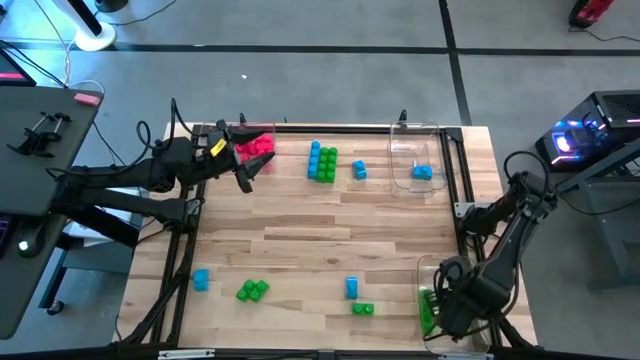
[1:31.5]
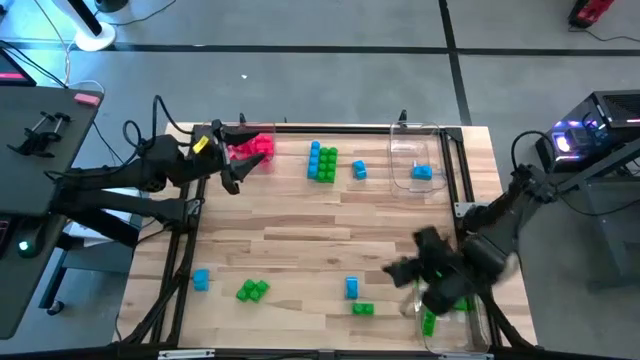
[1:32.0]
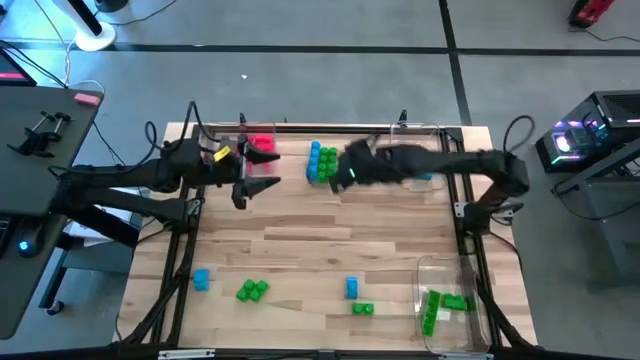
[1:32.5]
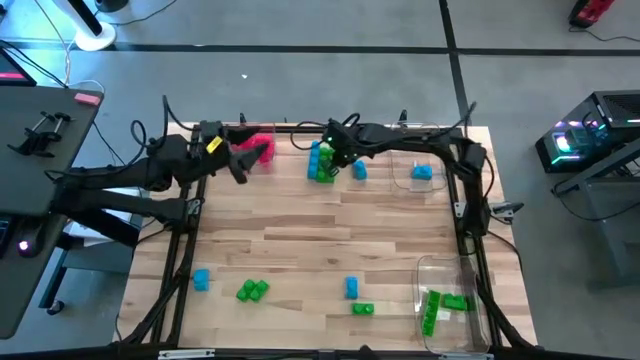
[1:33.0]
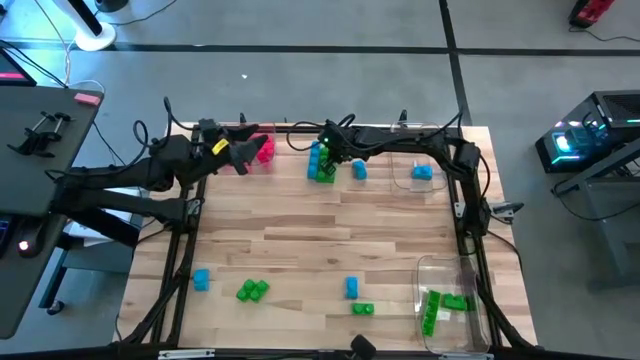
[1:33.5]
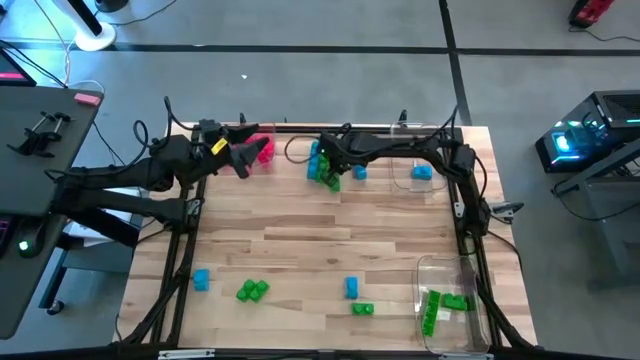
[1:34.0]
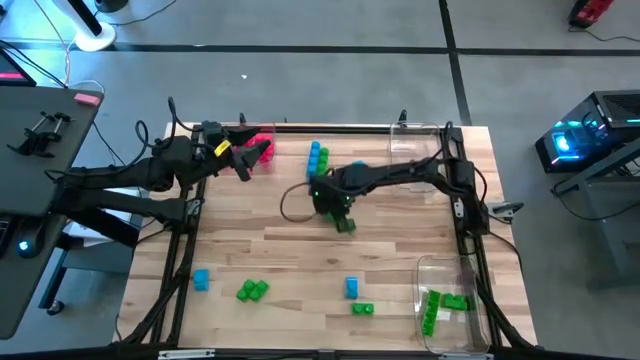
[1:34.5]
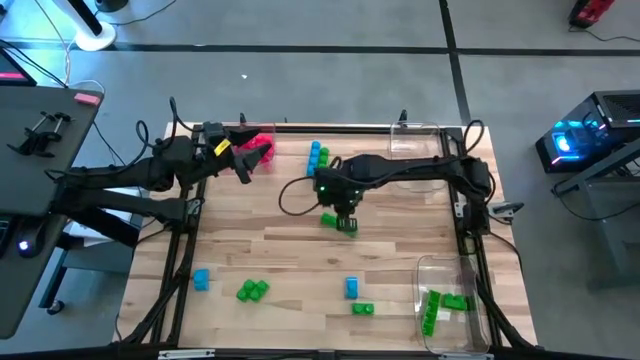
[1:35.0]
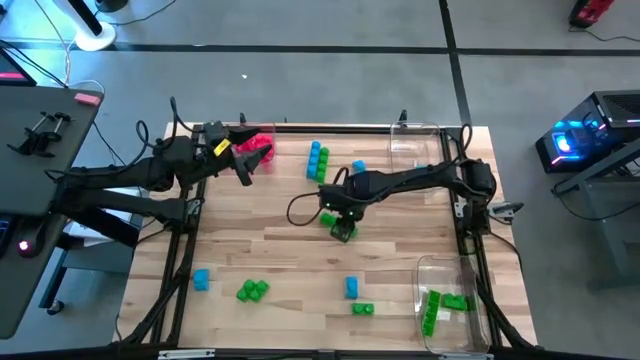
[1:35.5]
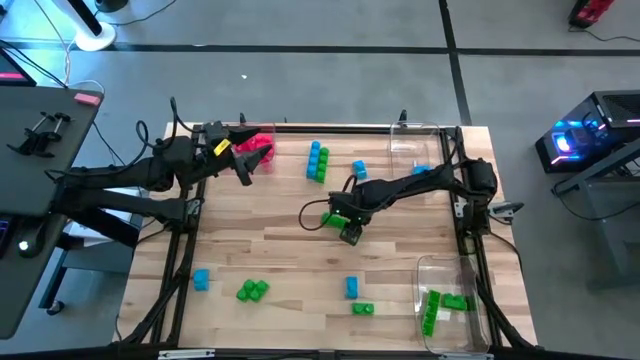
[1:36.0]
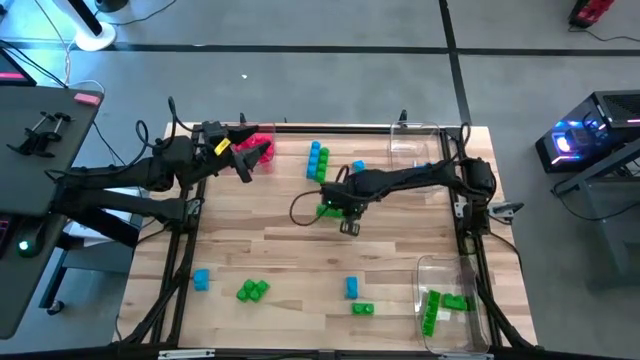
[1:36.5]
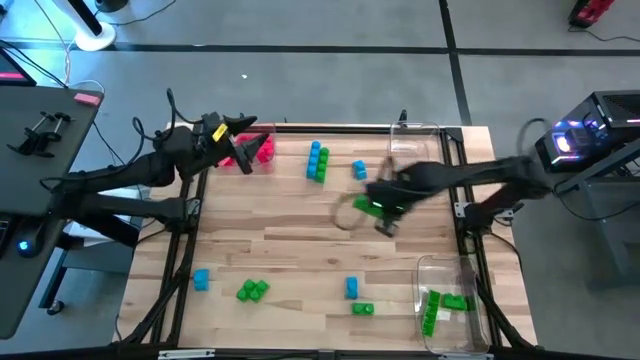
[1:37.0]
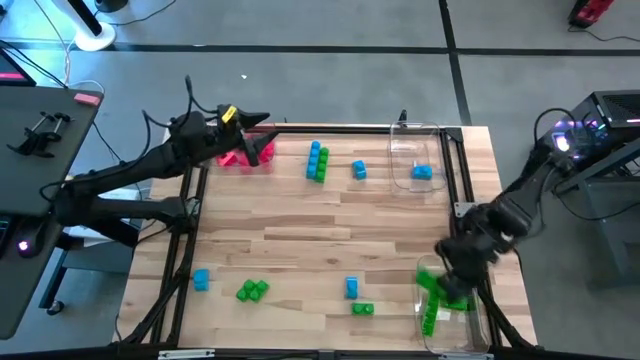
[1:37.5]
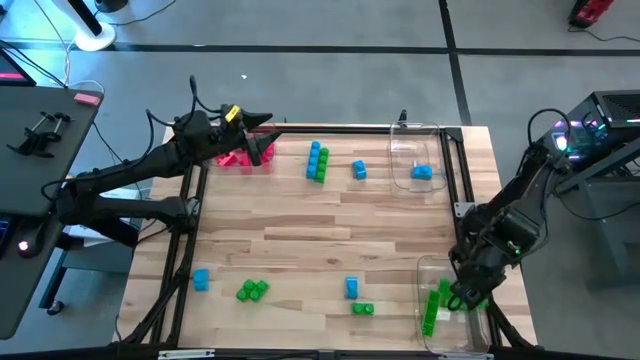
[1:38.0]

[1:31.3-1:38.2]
Task: Sort blocks
Put the green game piece into the bottom transparent bin

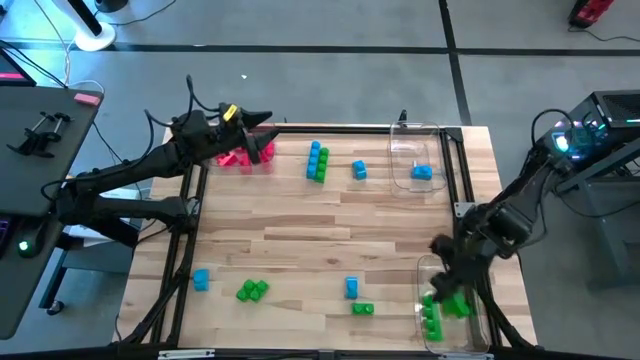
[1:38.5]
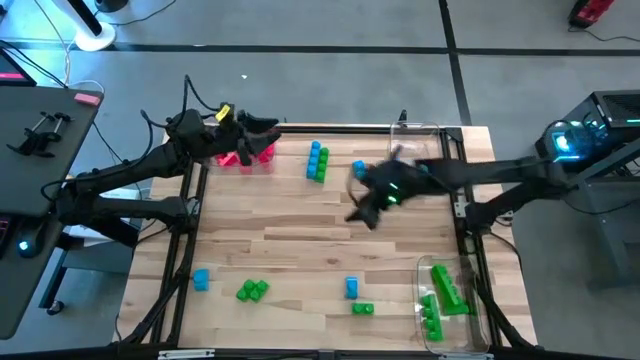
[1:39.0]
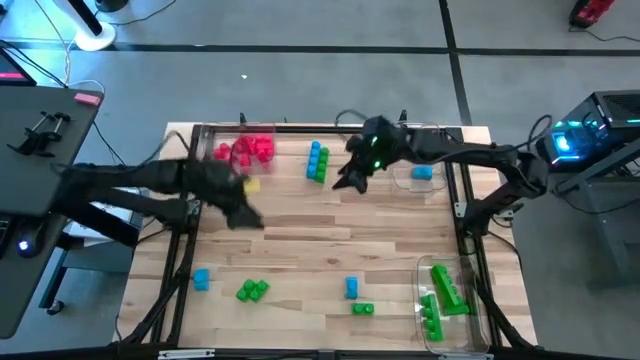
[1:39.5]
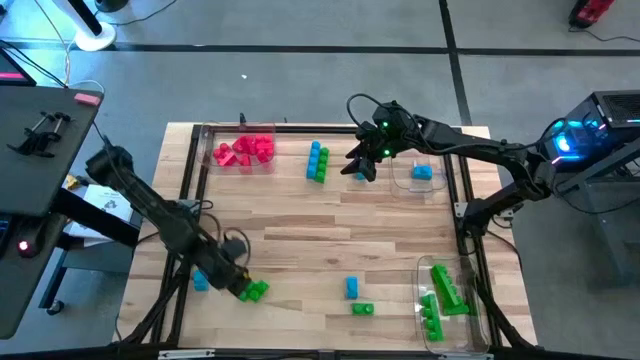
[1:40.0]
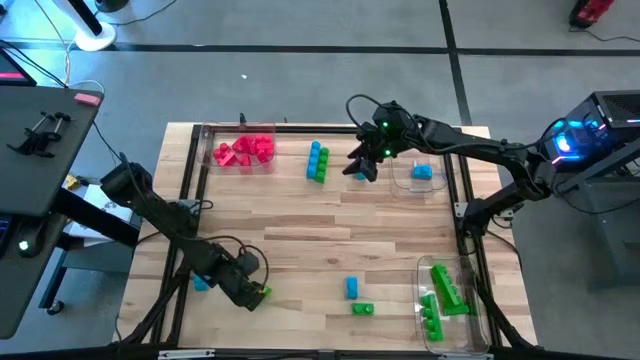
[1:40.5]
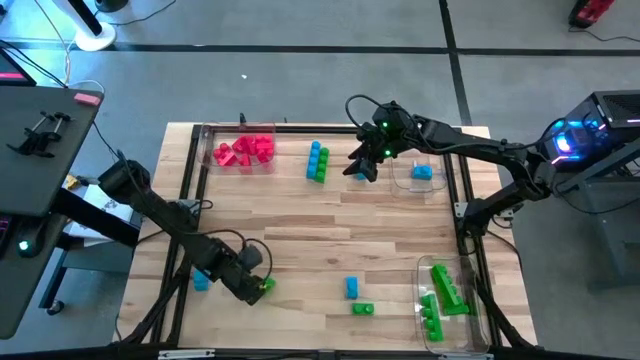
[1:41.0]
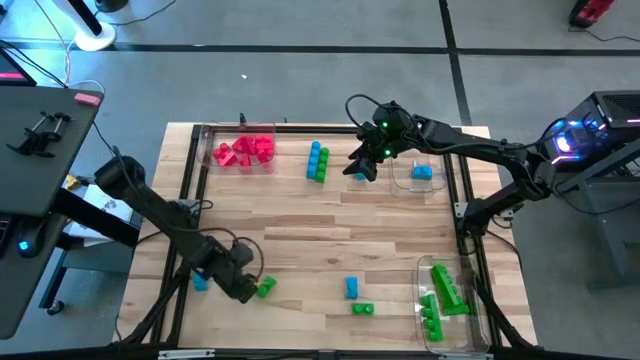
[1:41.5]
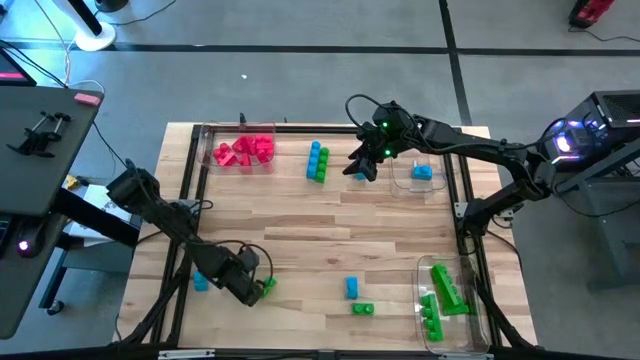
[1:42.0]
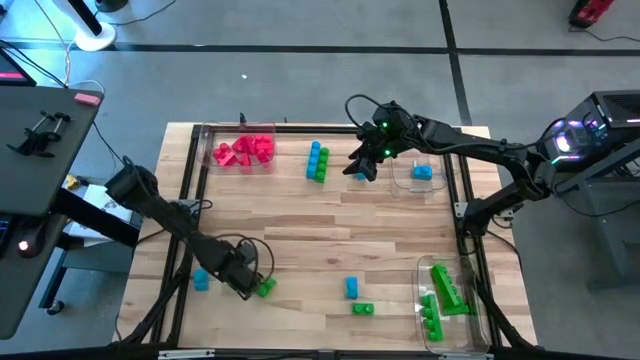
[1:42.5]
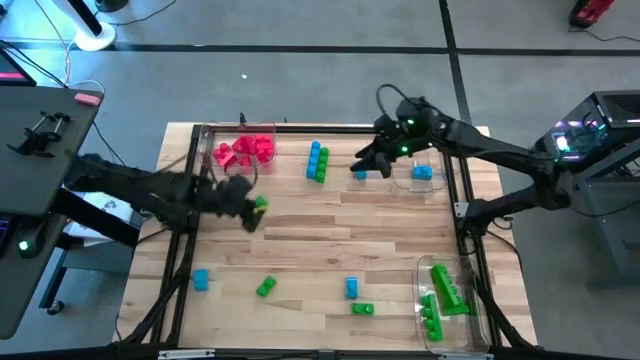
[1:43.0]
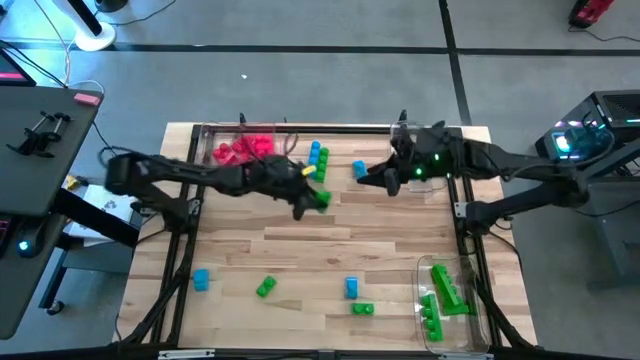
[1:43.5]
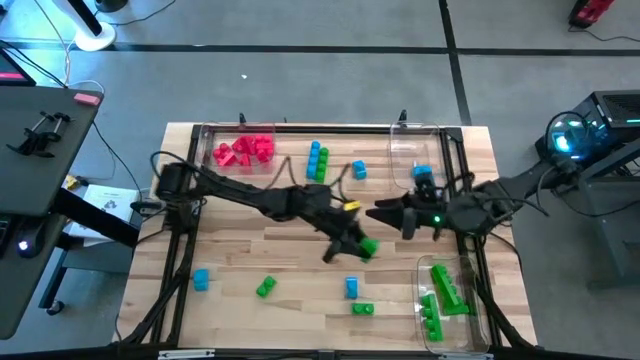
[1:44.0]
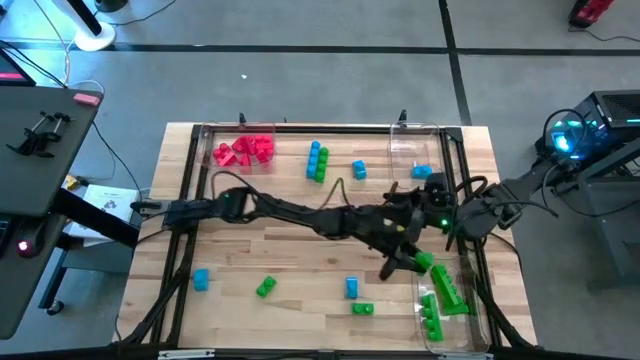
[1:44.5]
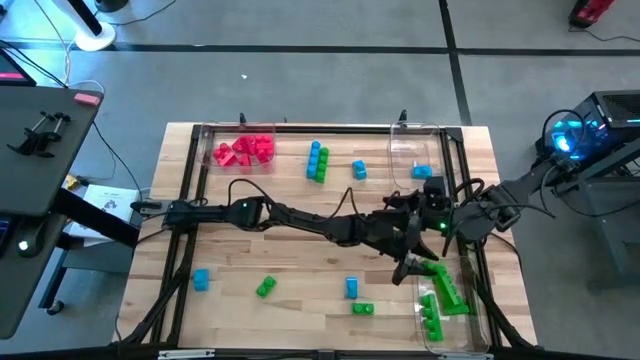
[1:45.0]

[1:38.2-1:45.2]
Put the green game piece into the bottom transparent bin

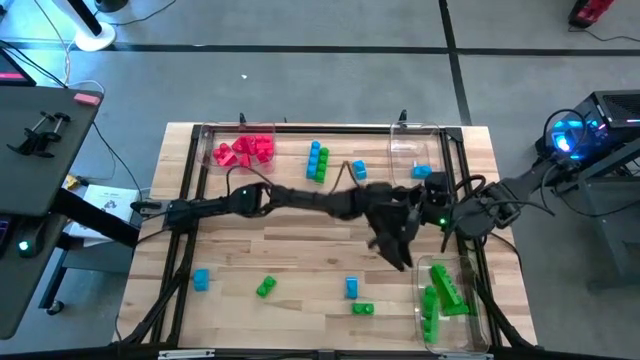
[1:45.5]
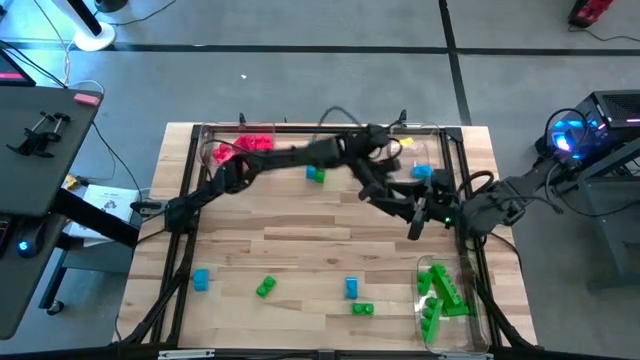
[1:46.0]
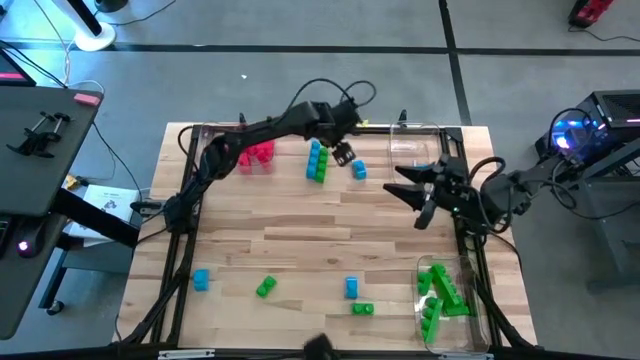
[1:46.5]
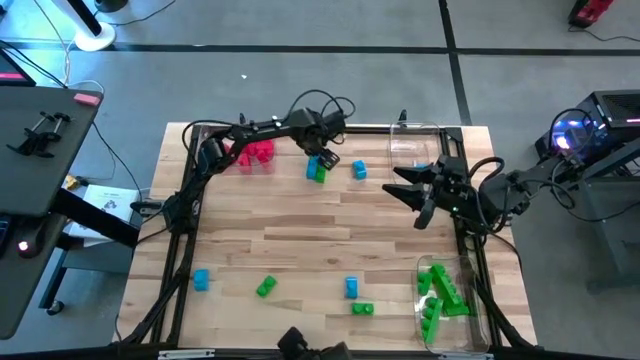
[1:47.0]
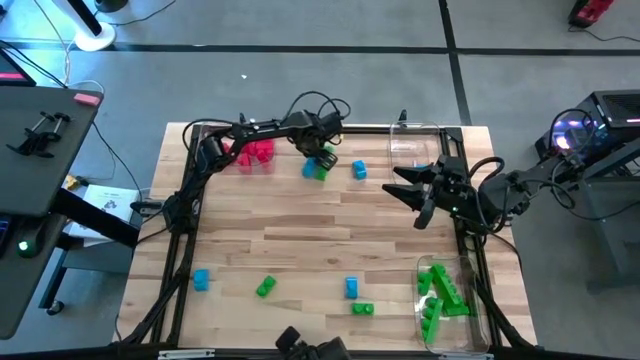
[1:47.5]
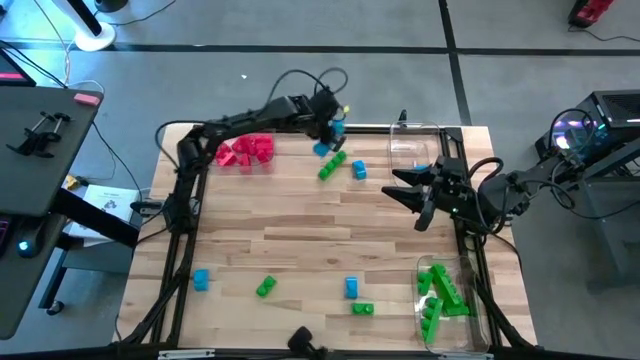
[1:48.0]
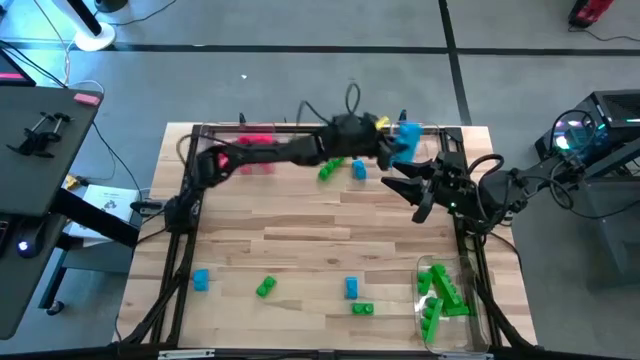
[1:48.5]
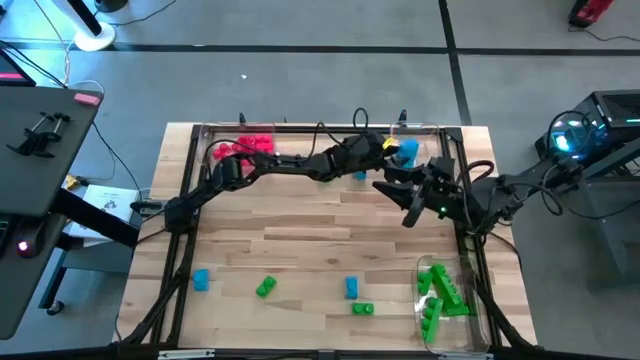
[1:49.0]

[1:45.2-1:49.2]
Put the blue game piece into the top right transparent bin

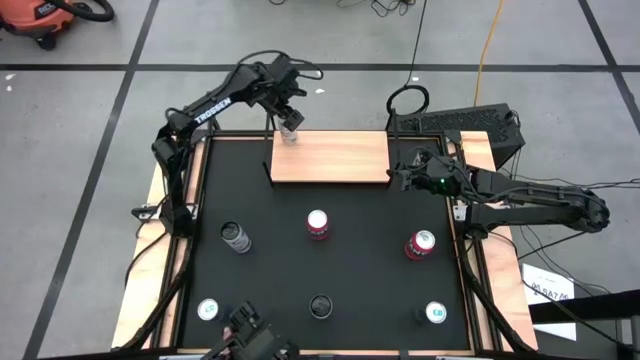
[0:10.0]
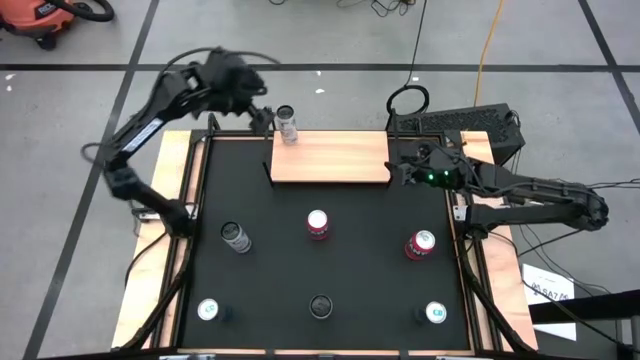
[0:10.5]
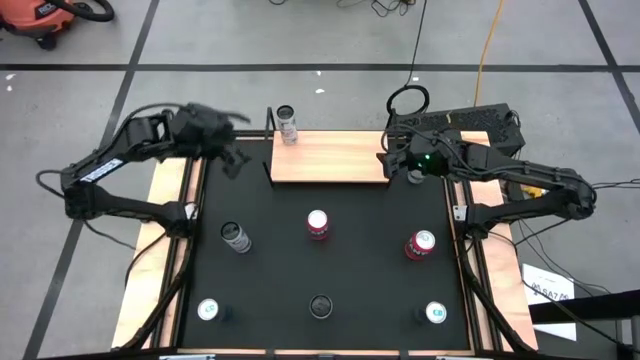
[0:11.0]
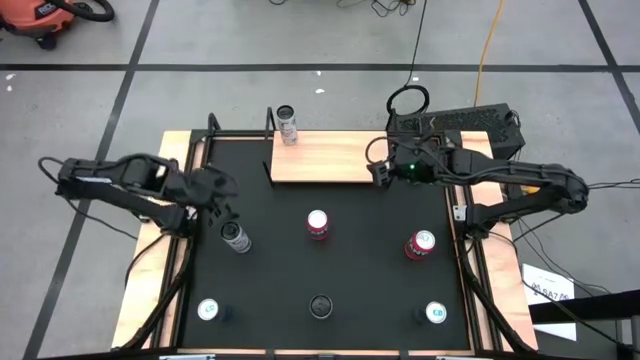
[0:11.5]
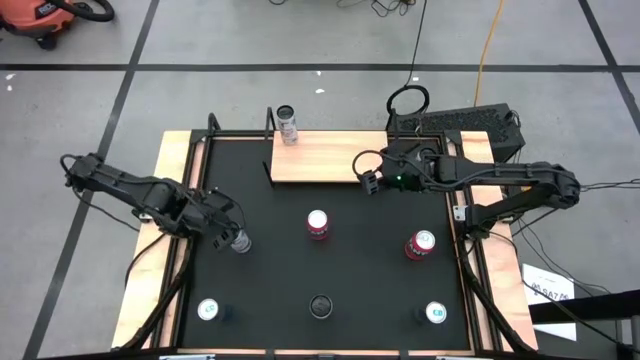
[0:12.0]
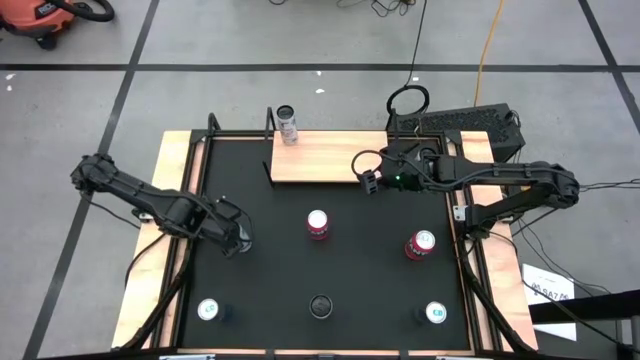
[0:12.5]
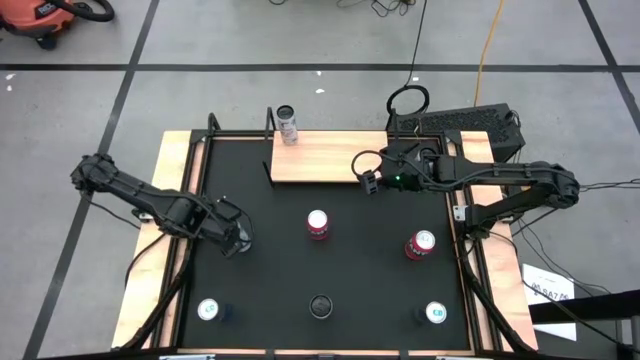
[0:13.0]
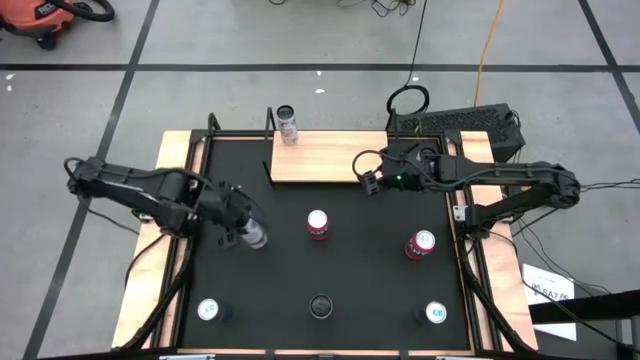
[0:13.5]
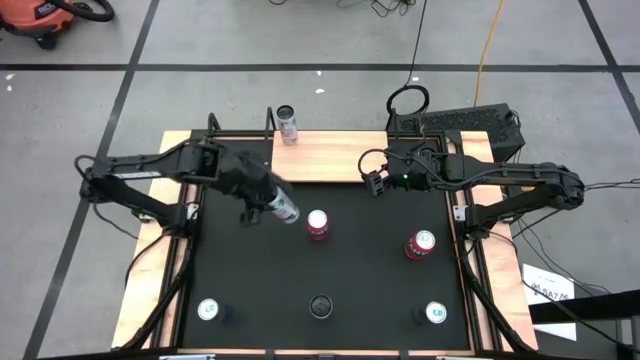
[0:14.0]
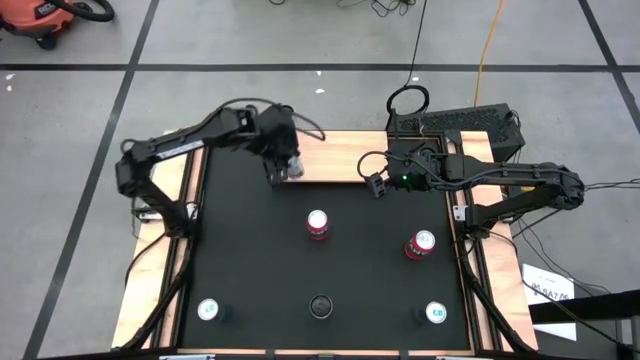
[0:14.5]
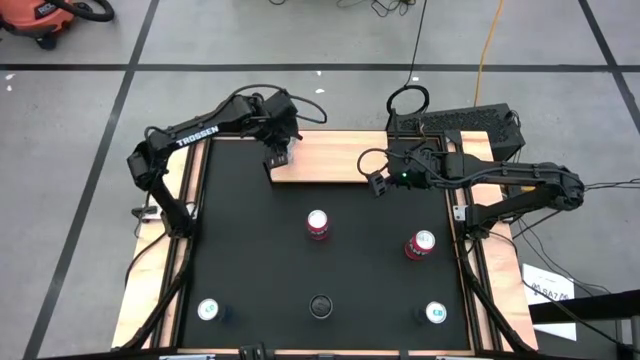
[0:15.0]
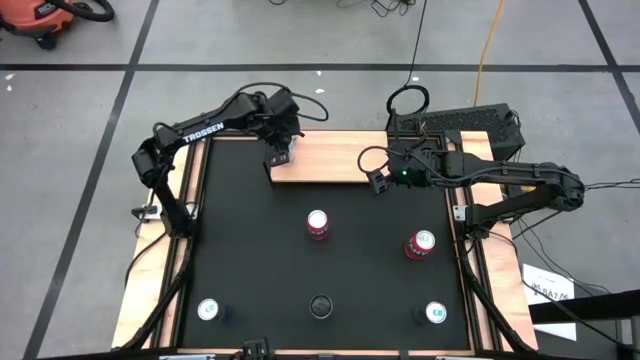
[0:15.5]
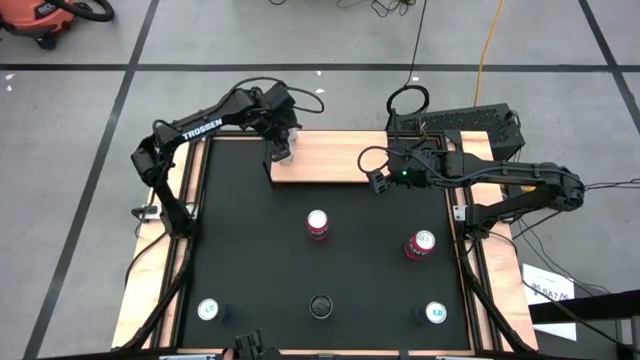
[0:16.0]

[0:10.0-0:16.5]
Task: Place canned beverage on shelf
Put the white pink soda can aligned with the other white pink soda can on the shelf
